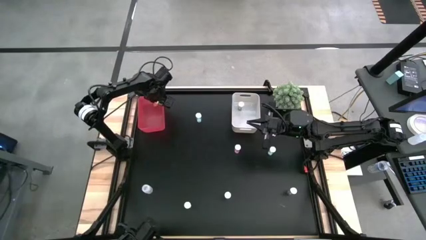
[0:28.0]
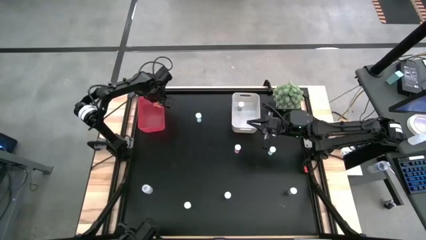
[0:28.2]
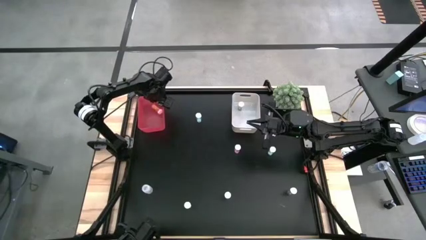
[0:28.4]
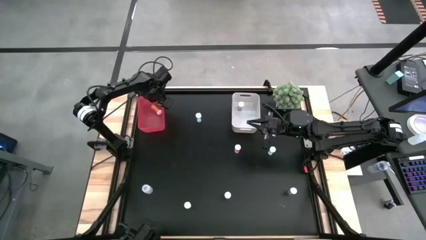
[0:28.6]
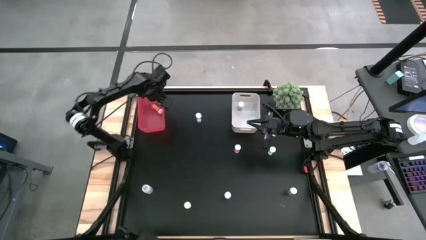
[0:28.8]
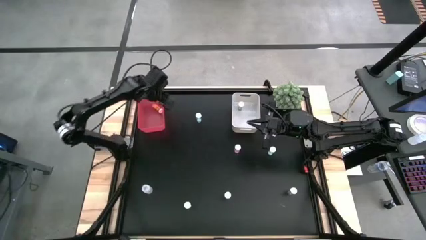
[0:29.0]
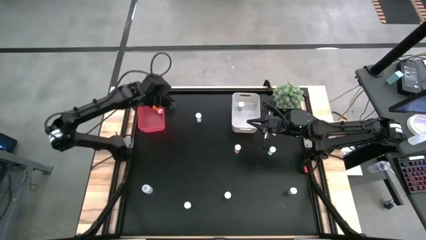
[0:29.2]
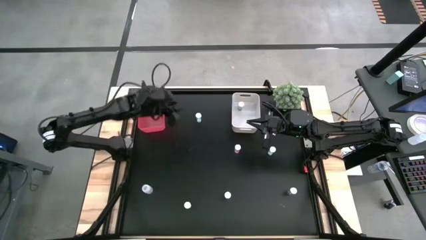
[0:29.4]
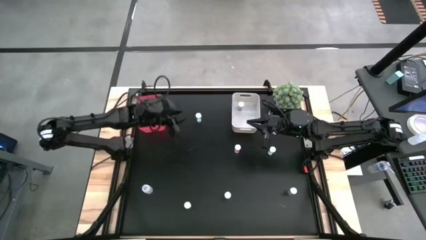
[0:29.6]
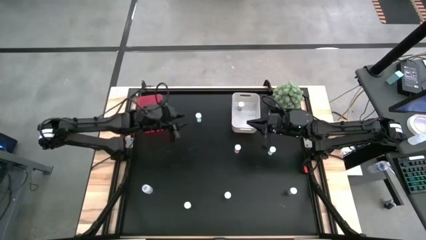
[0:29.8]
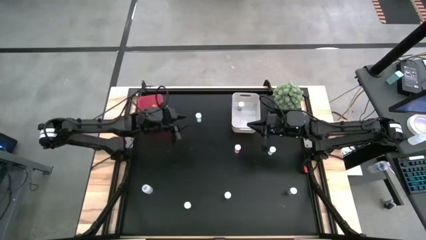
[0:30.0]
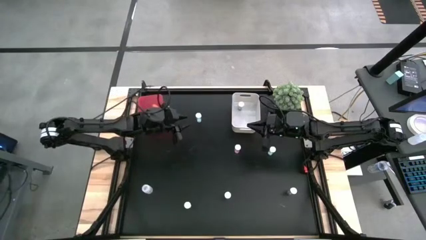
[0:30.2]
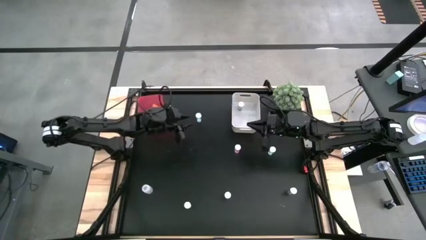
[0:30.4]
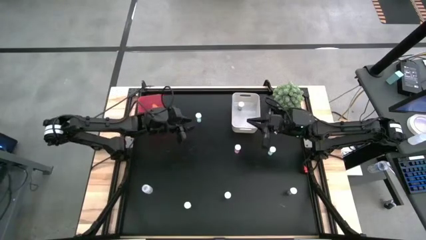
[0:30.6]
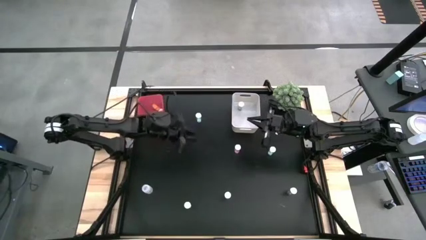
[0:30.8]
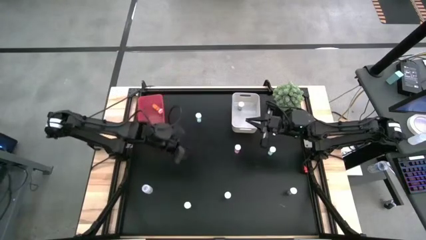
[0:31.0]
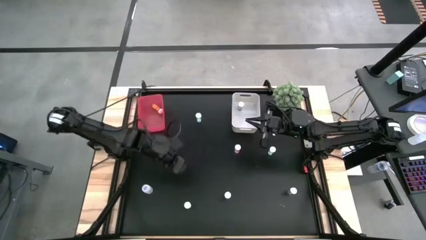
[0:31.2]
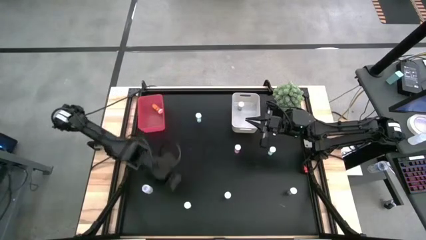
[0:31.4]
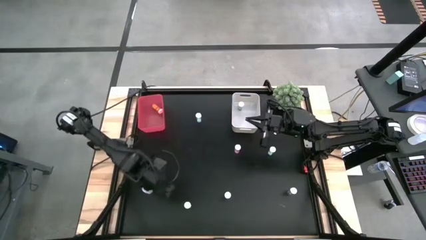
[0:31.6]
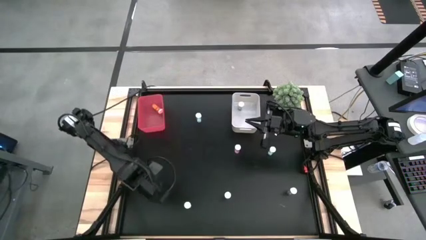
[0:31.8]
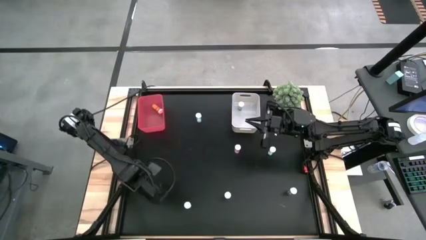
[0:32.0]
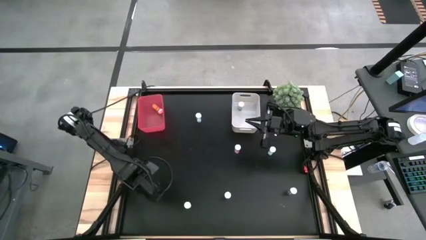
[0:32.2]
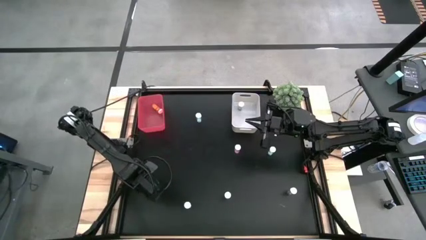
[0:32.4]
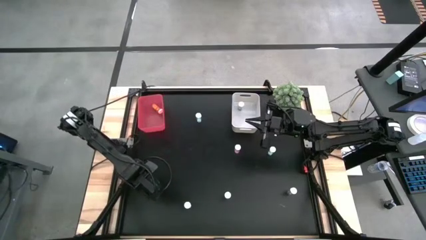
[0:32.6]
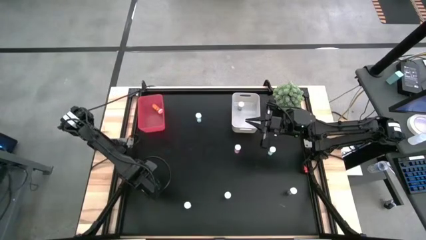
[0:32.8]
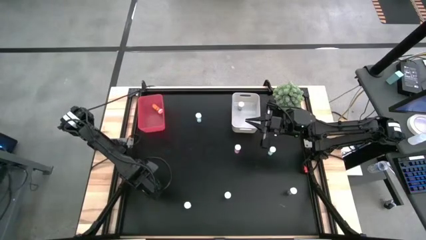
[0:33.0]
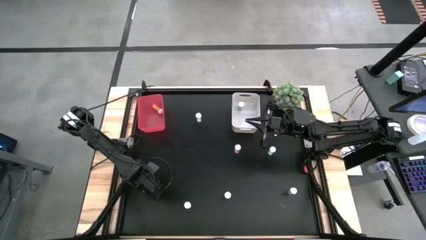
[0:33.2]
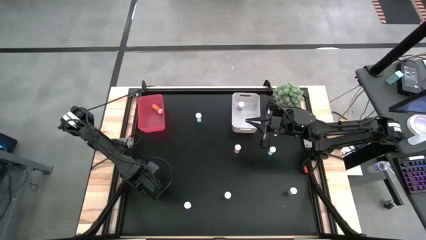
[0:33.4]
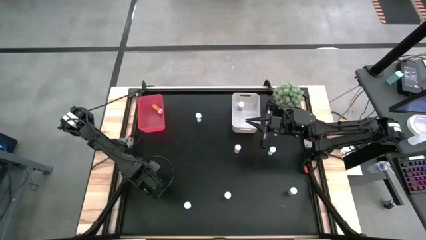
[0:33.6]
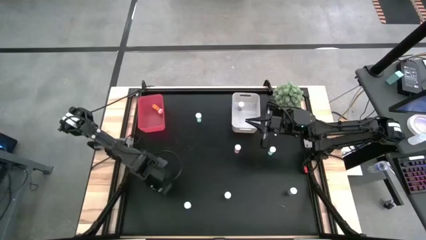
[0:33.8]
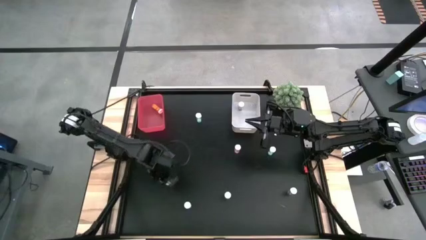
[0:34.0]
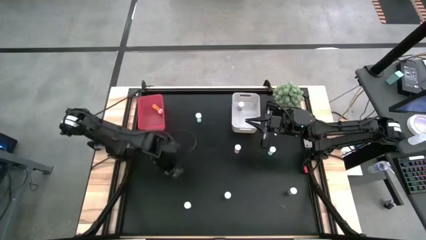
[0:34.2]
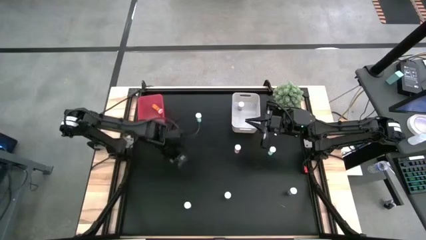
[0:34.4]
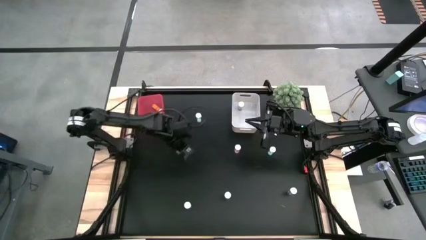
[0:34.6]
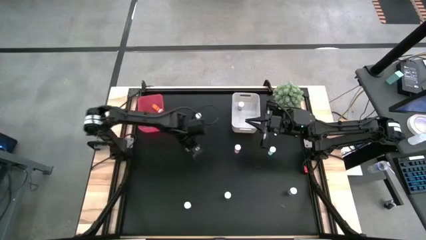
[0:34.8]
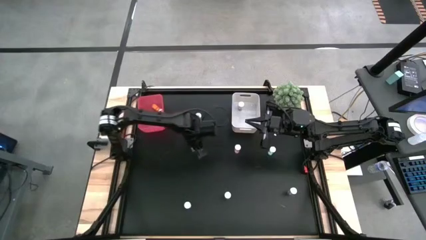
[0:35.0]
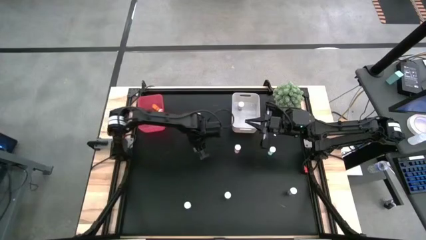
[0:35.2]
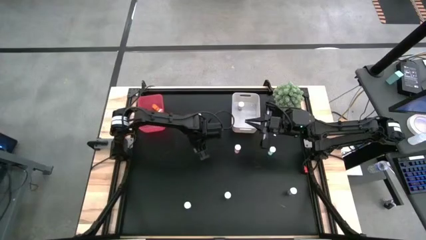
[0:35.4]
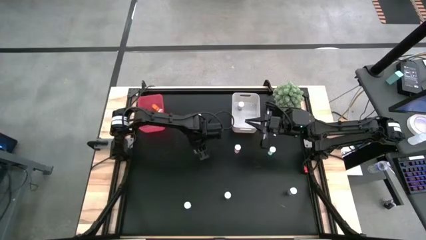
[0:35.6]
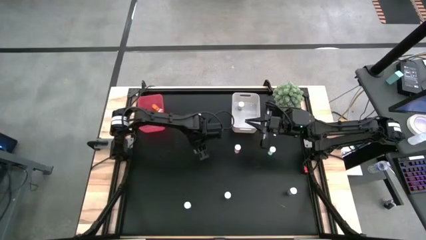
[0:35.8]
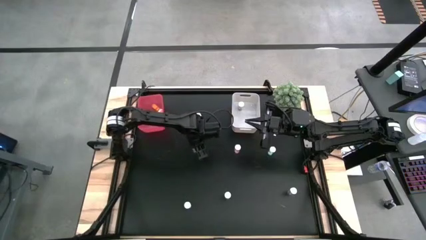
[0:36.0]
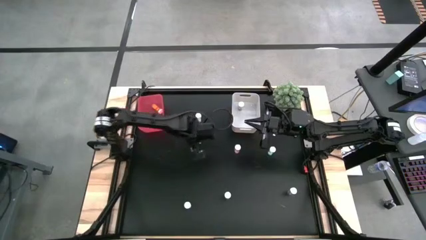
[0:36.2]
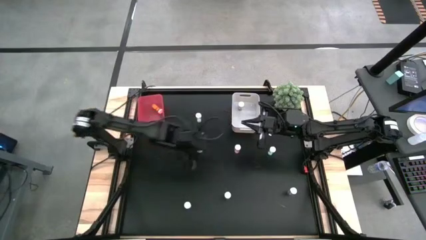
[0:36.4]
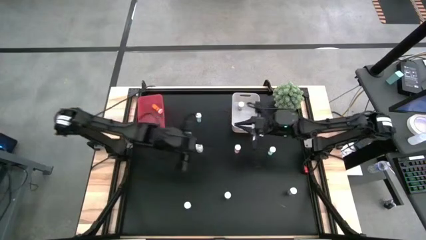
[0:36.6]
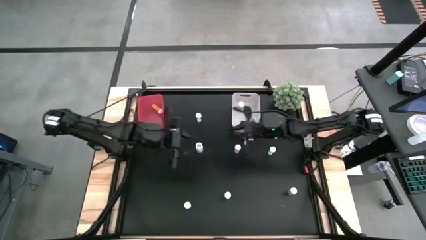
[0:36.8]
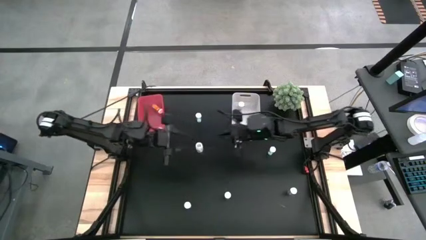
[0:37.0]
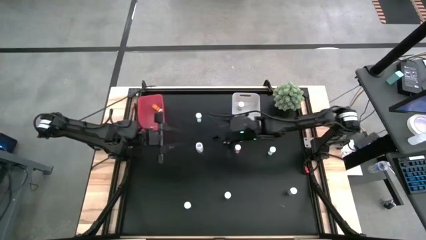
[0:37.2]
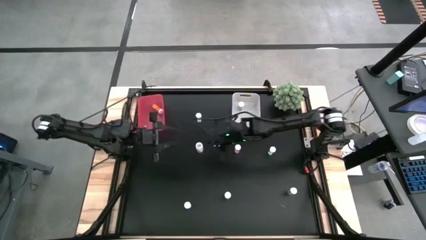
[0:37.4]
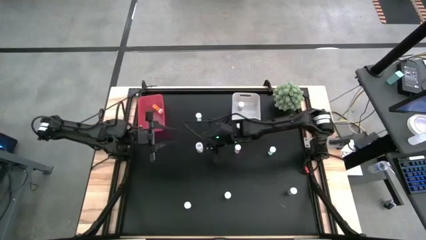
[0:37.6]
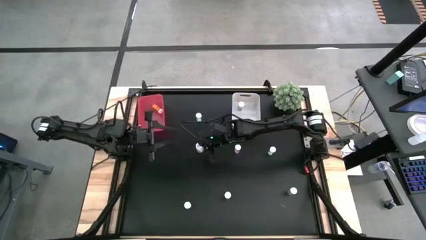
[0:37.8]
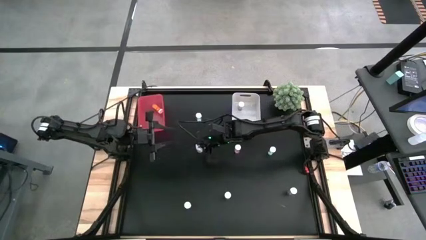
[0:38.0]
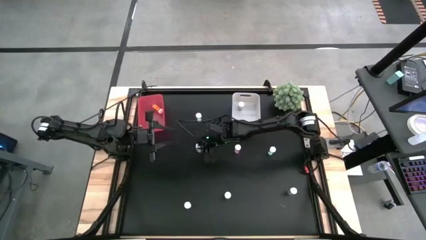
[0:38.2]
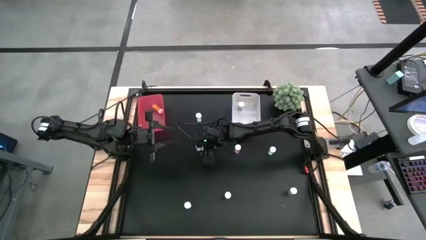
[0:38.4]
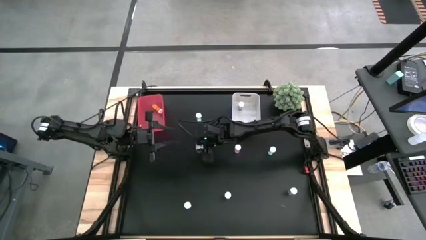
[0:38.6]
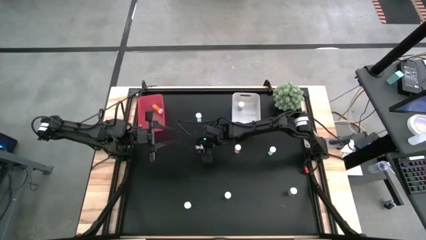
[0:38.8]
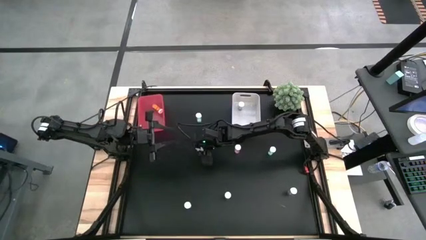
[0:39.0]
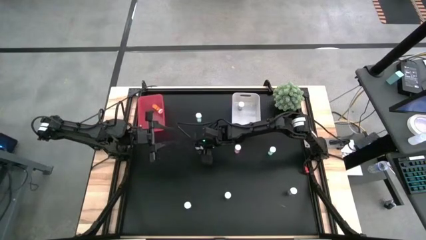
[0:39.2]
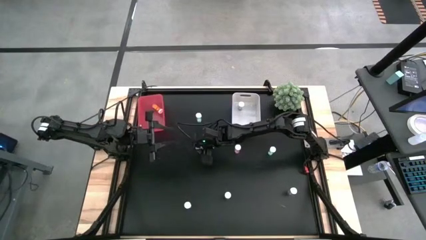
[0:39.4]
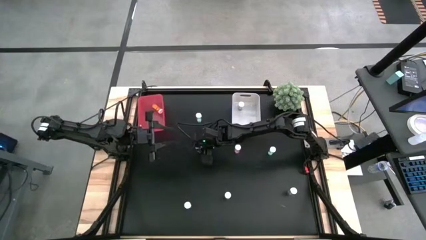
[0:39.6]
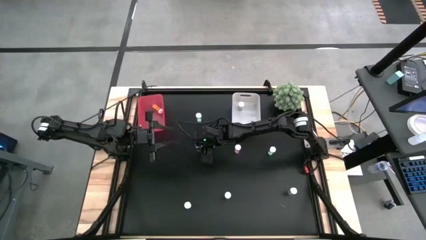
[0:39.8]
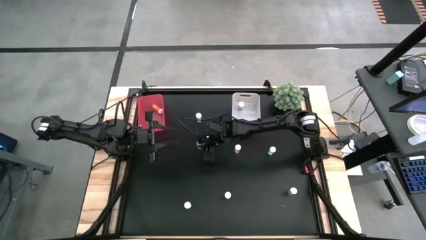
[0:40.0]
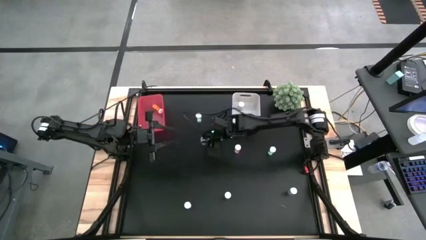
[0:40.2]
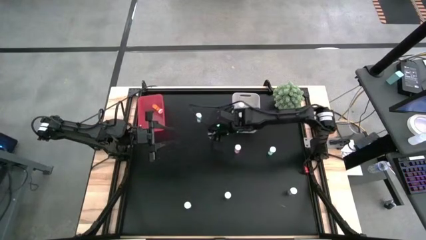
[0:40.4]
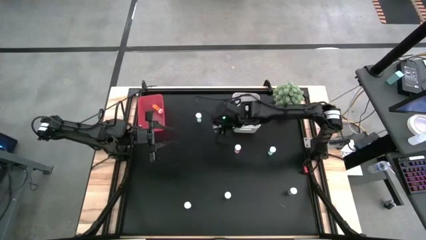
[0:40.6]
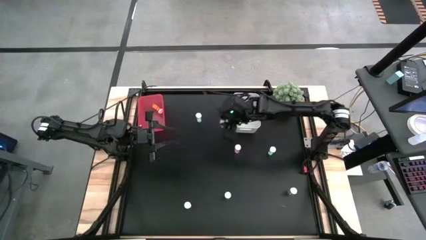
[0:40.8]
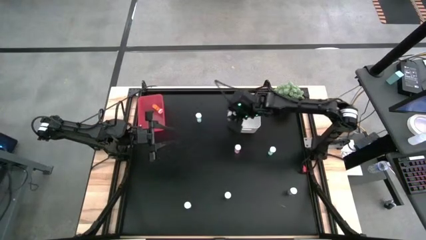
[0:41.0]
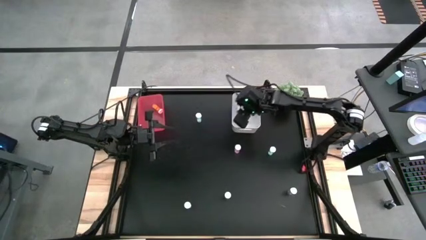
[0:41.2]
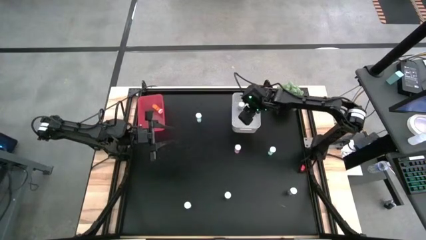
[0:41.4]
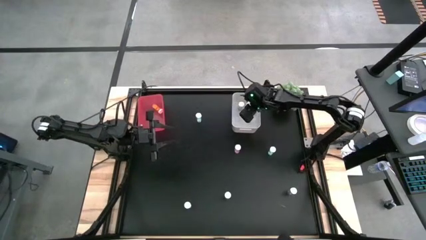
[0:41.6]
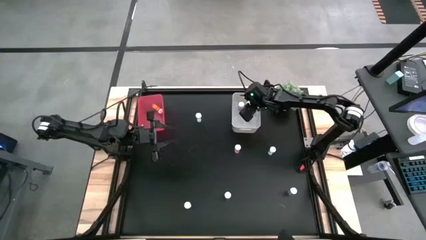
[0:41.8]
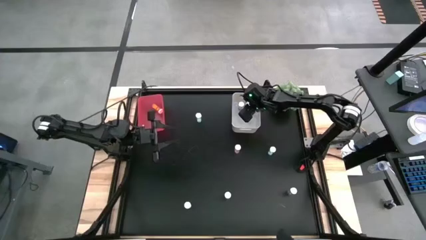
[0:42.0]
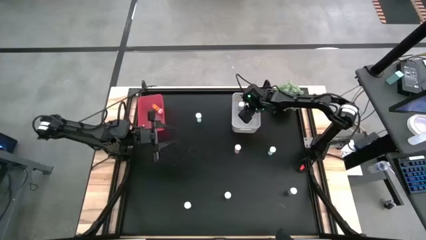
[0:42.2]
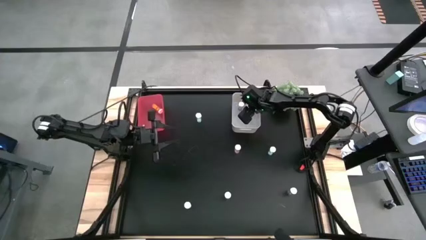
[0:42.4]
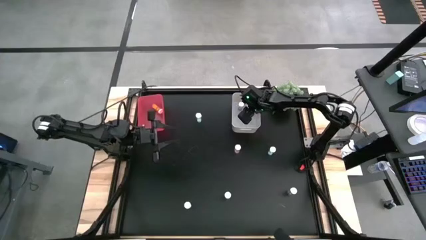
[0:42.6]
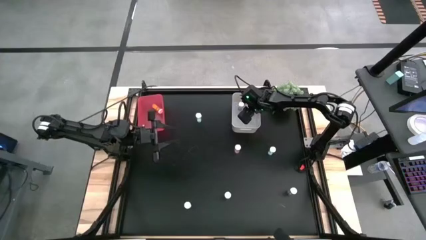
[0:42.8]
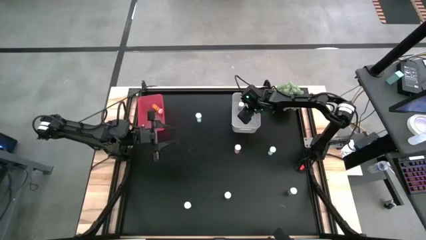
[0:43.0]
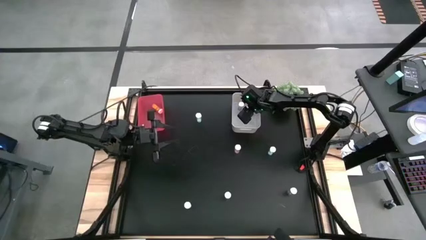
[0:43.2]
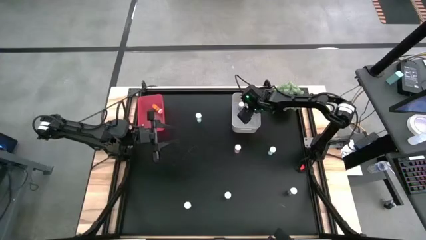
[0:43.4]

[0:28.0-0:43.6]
Task: Pick and place medicine bottles into bin by pill shape (circle, oval)
Put the transparent capsule bottle into the white bin
